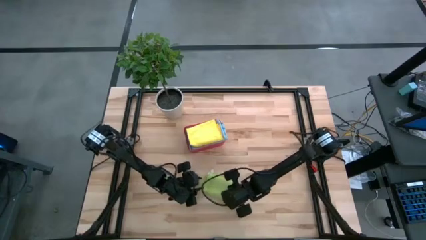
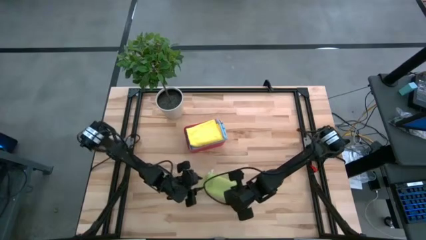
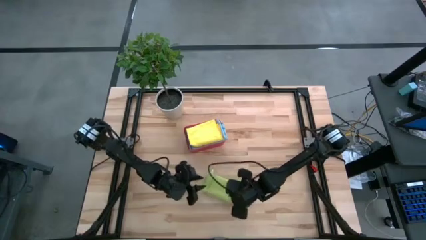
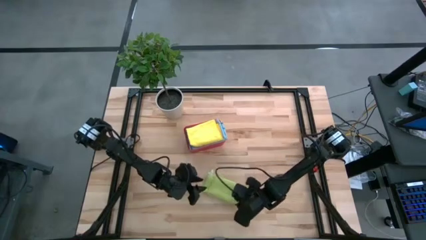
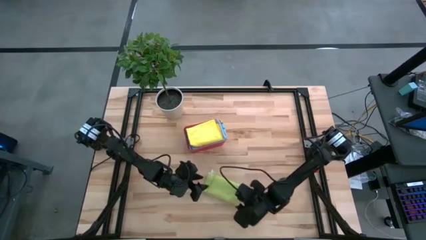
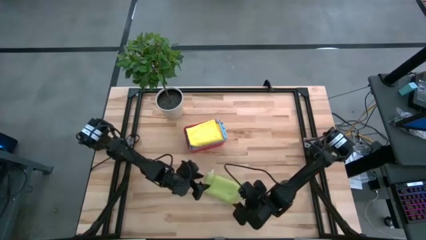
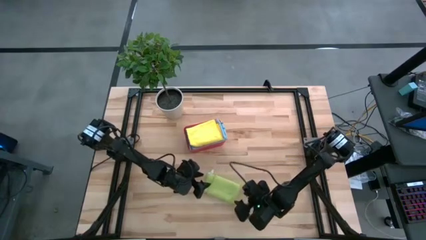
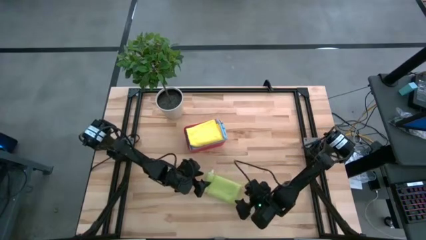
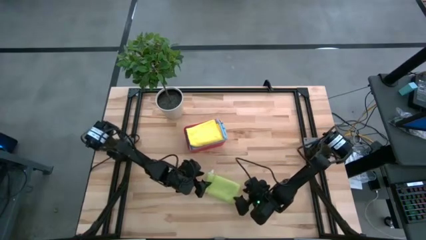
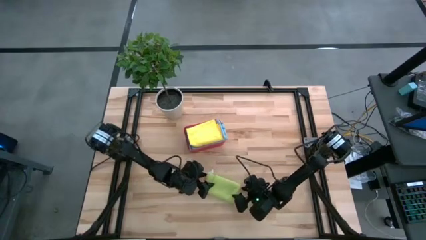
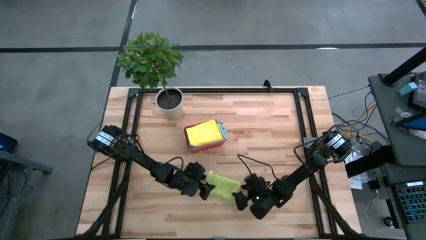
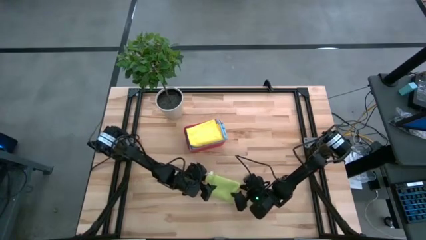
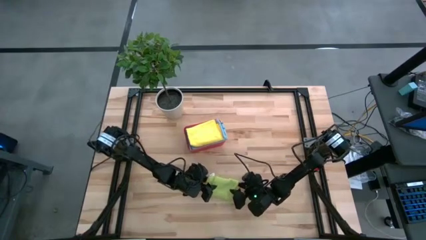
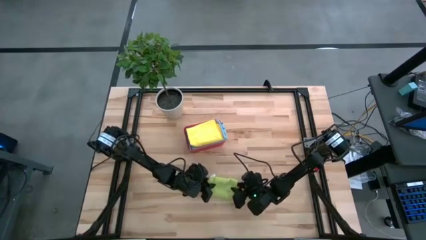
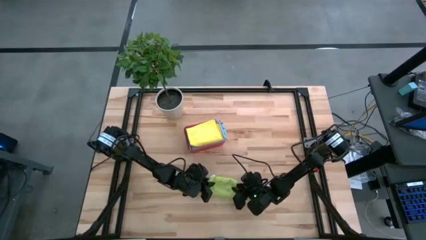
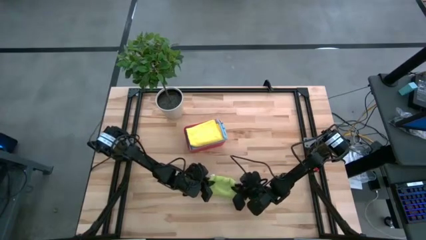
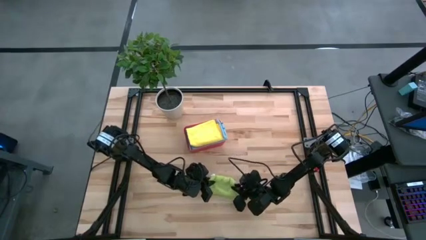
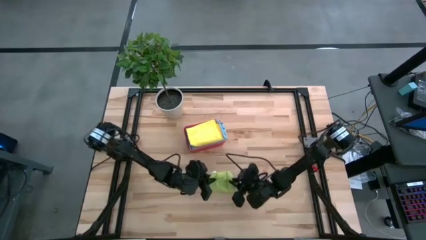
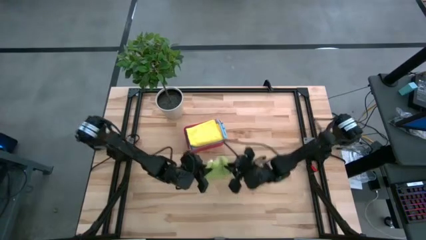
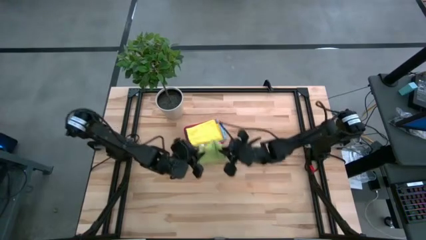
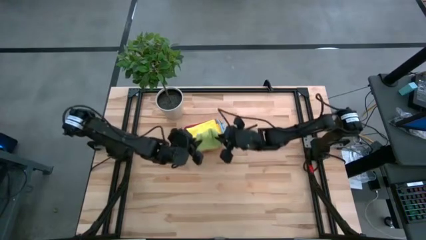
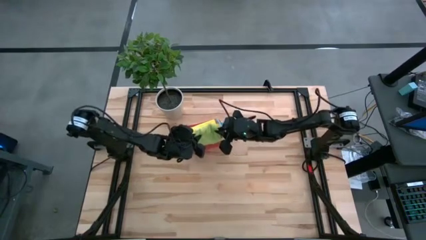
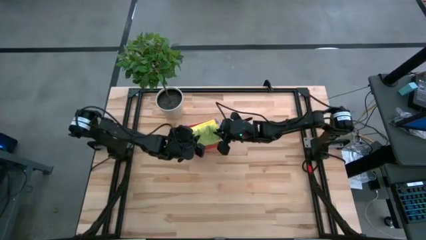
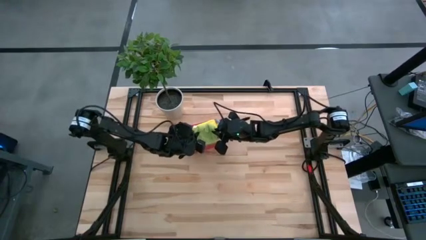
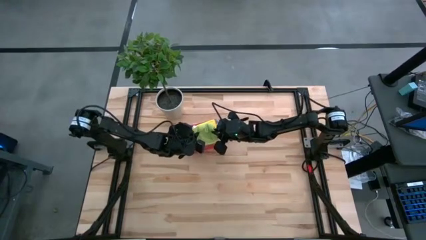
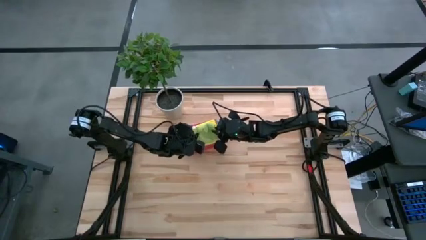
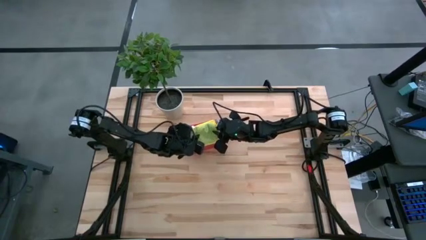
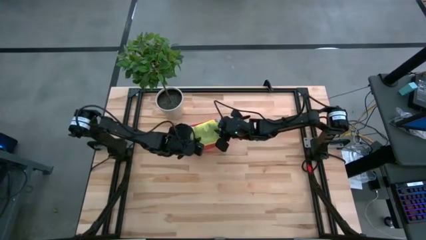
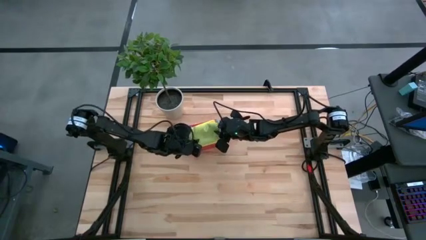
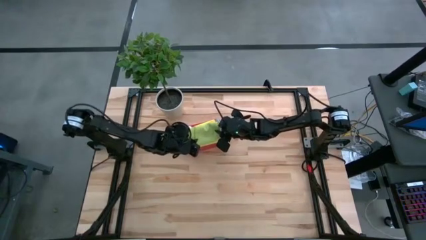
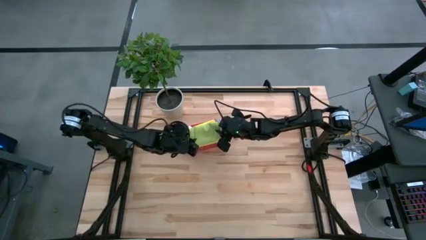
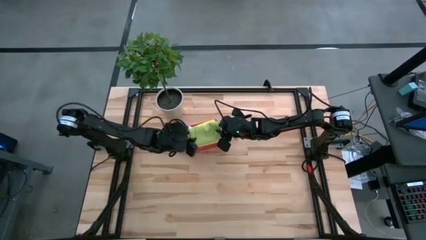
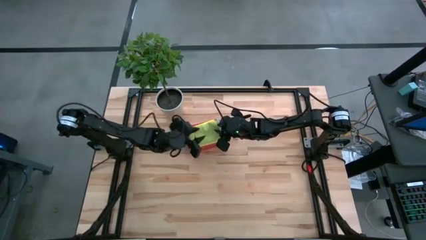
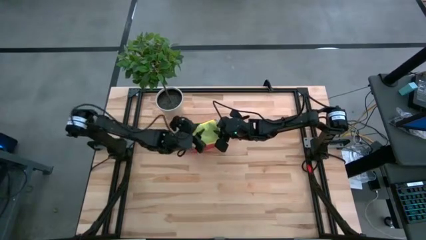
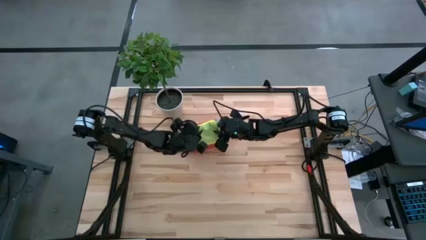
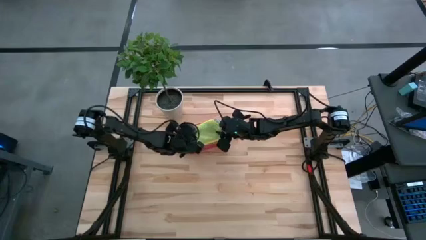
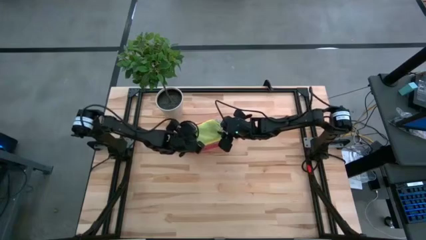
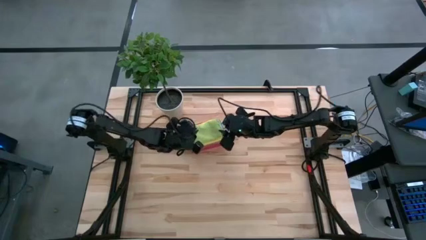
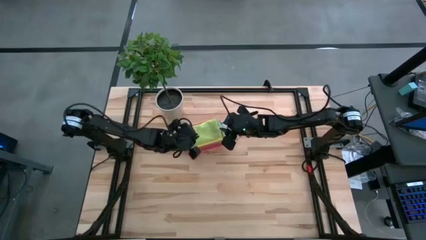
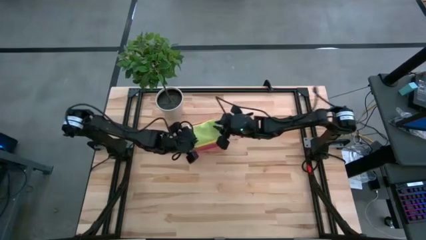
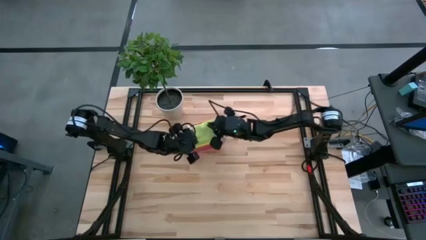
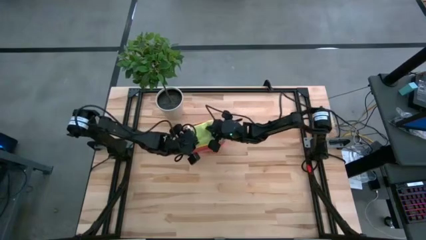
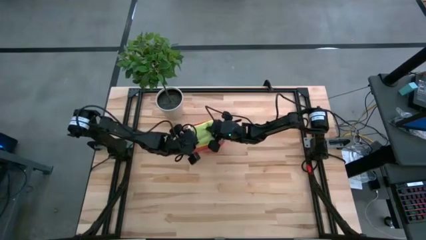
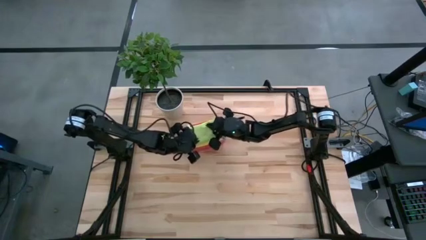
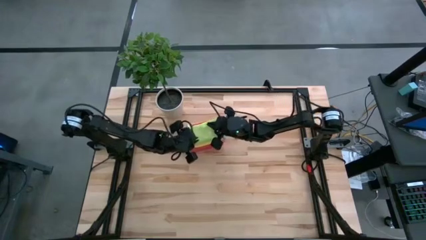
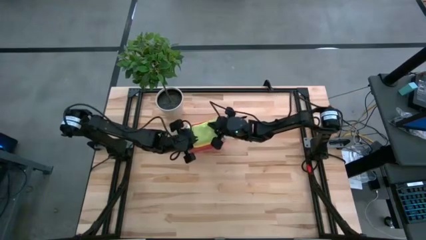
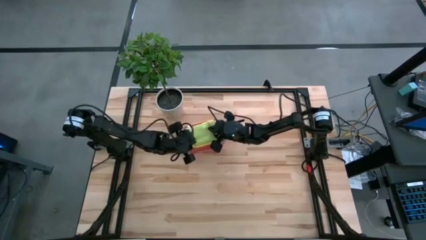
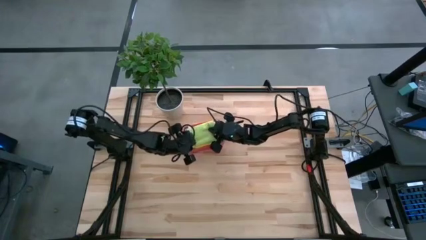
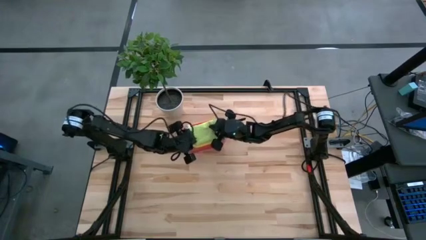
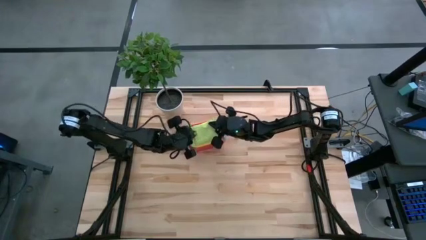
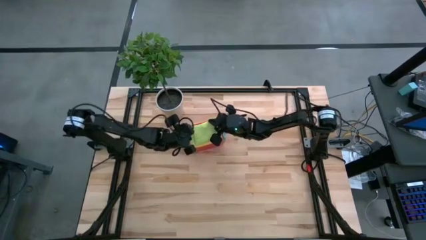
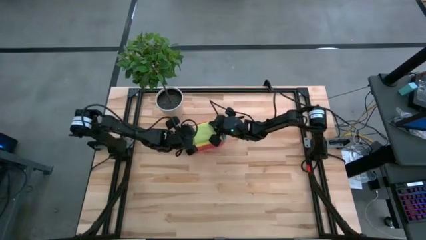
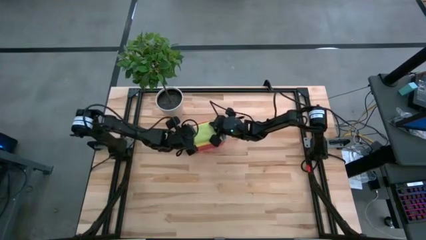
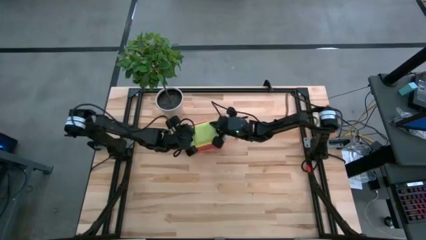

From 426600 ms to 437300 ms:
Task: Fold microfiber towels
Put the folded green microfiber cloth into the pink bin

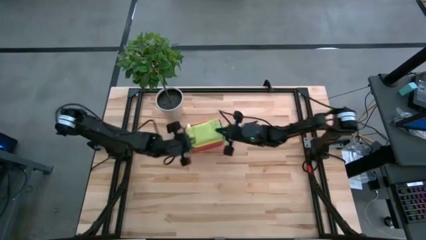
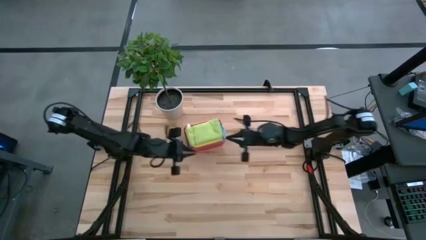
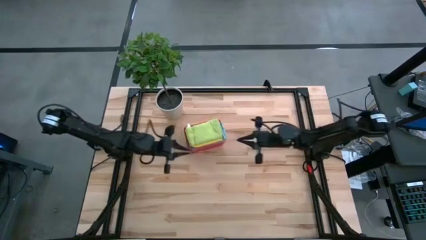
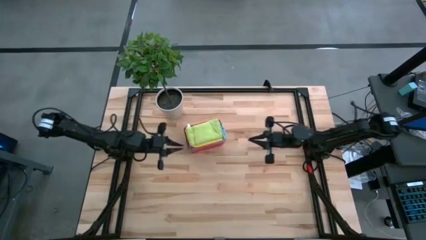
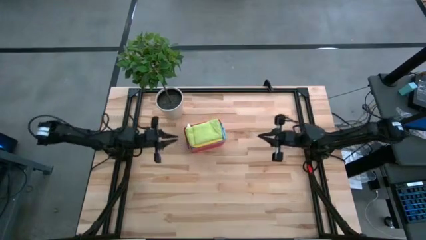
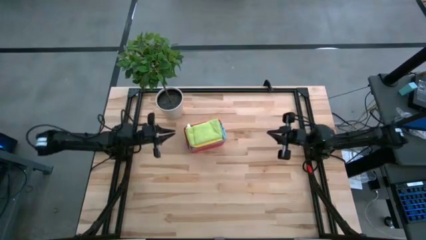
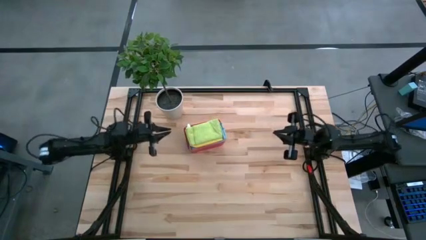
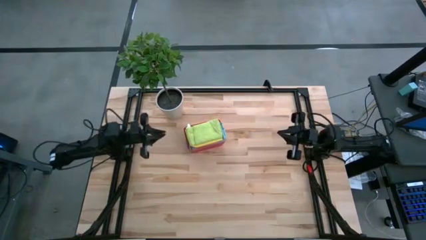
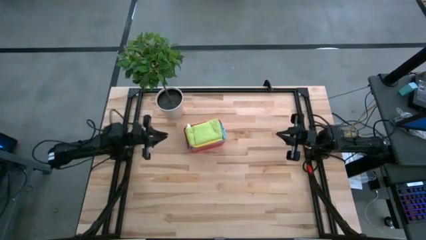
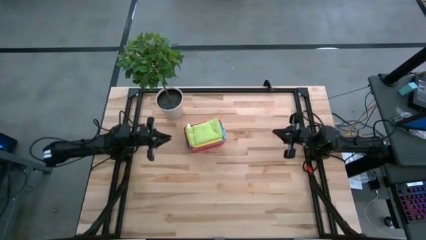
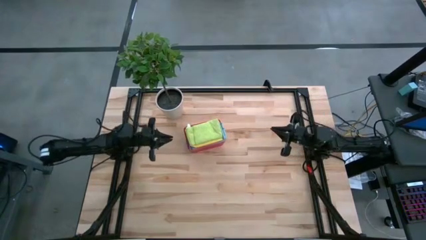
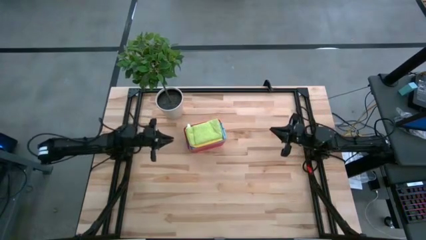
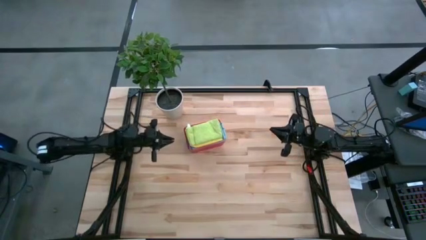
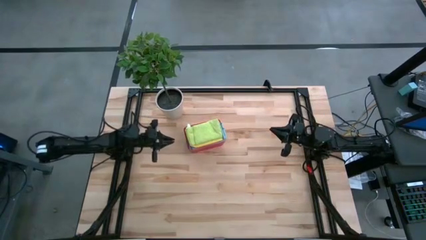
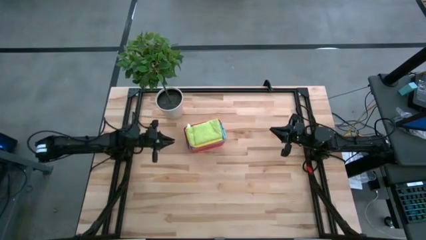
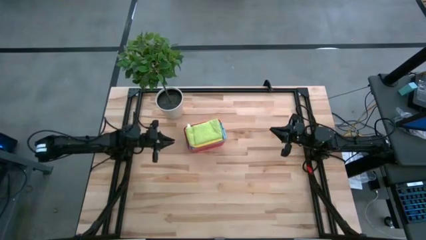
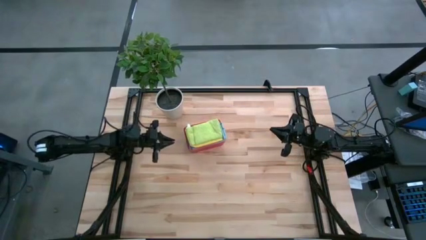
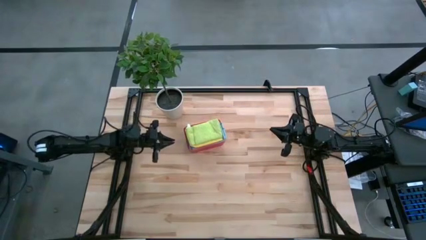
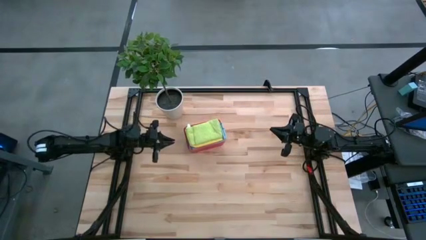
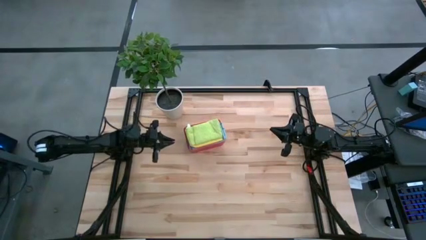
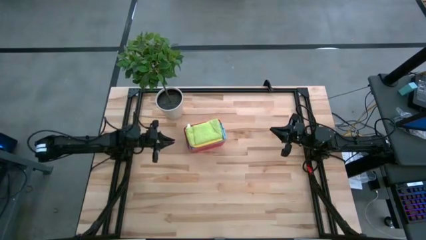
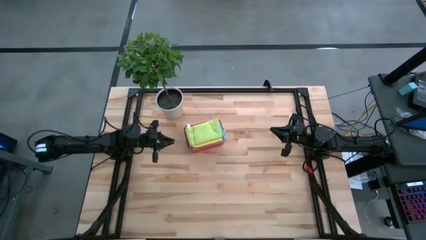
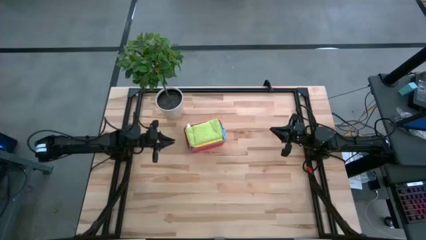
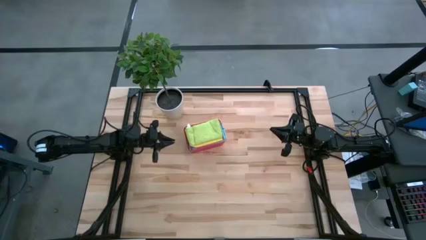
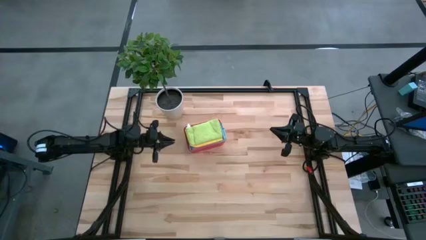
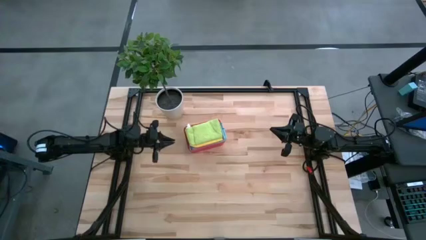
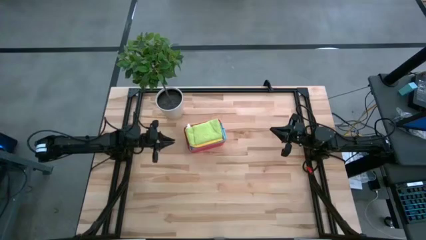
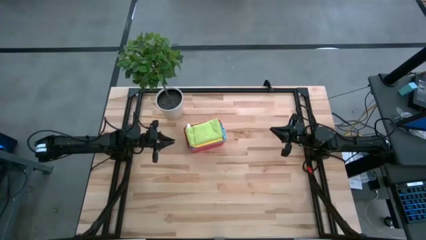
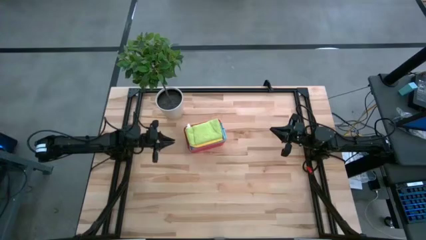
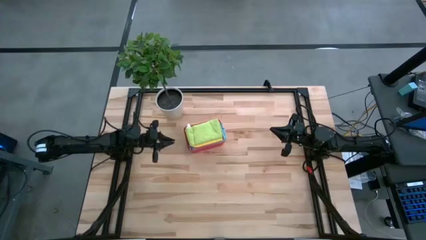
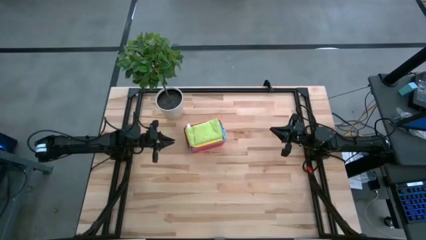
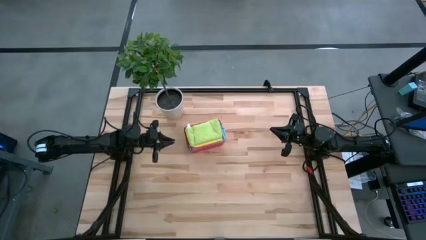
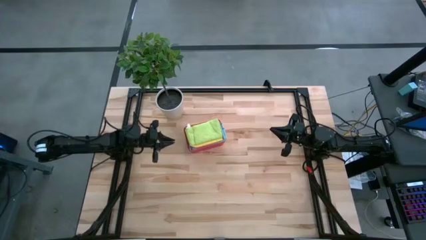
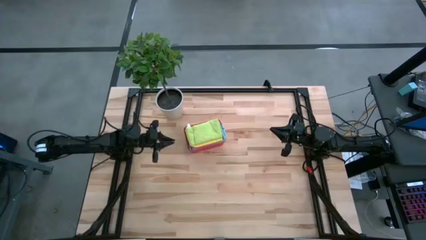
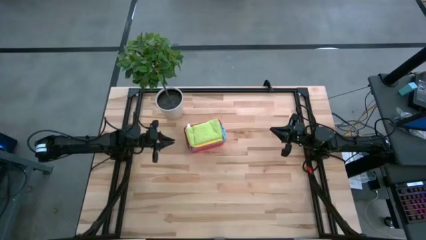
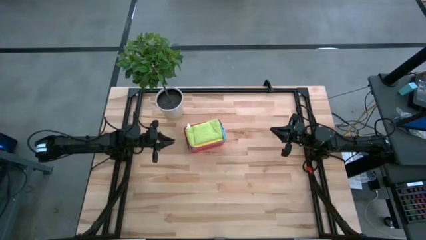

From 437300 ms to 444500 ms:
Return to Home Position
